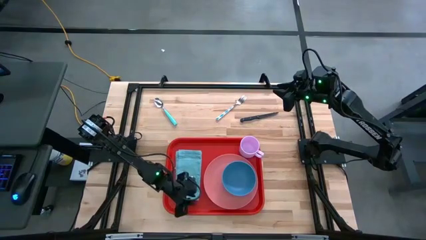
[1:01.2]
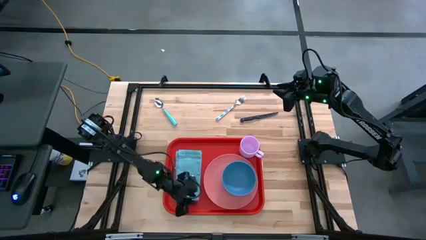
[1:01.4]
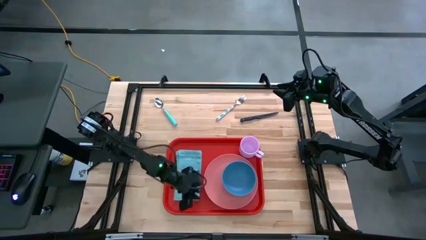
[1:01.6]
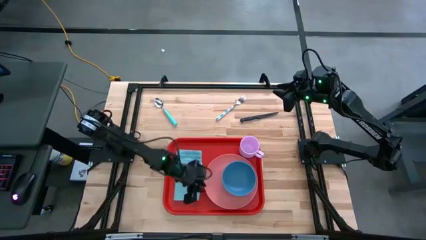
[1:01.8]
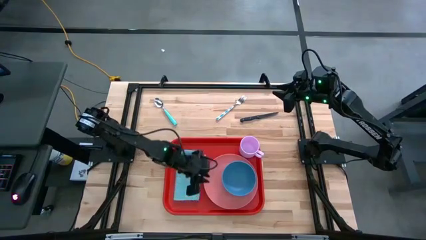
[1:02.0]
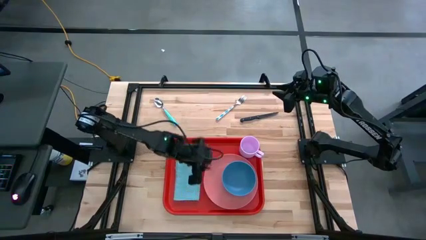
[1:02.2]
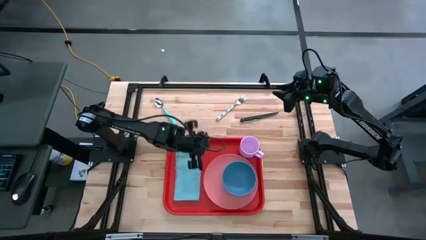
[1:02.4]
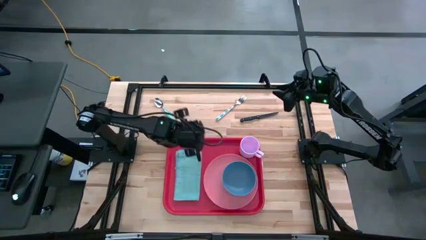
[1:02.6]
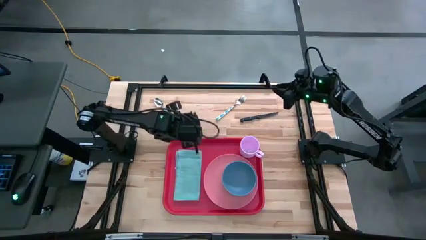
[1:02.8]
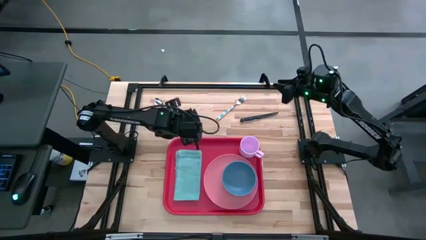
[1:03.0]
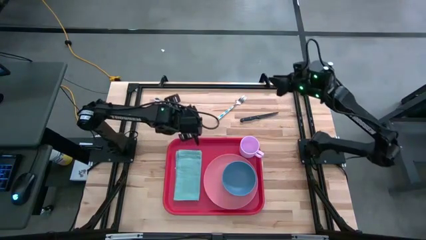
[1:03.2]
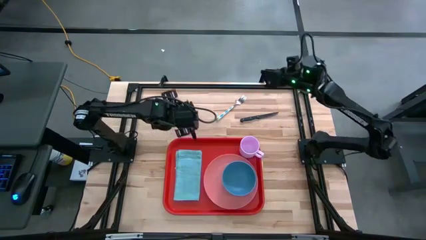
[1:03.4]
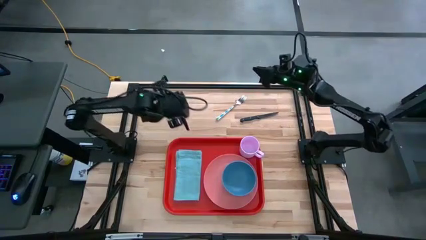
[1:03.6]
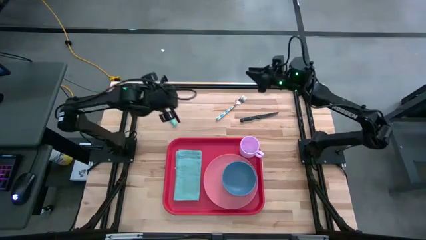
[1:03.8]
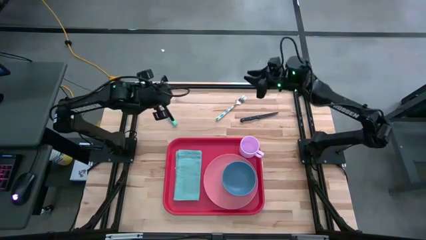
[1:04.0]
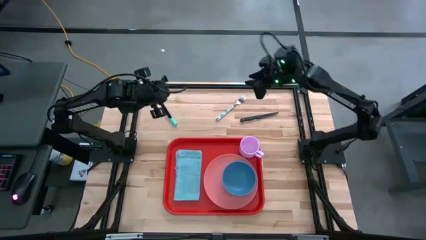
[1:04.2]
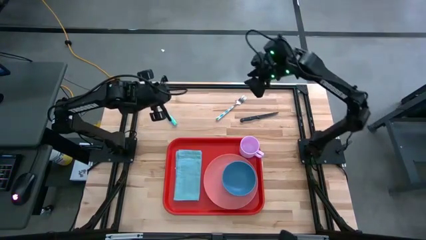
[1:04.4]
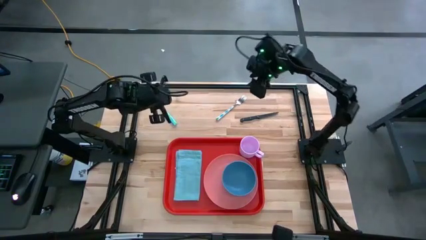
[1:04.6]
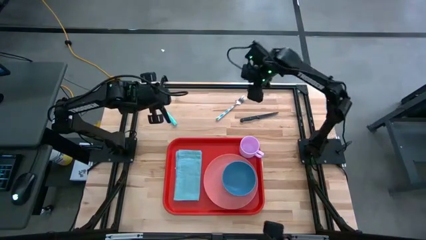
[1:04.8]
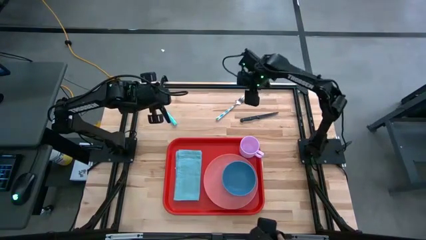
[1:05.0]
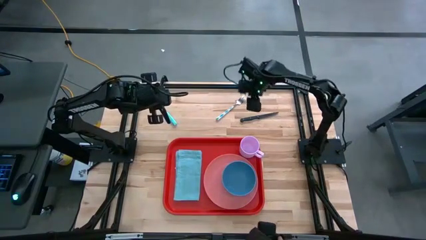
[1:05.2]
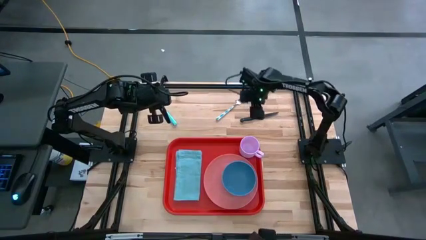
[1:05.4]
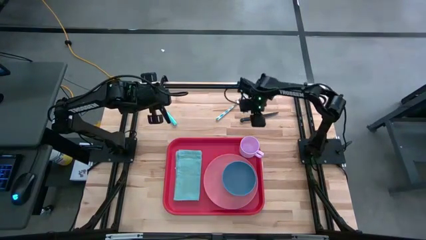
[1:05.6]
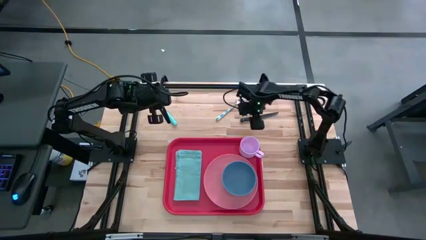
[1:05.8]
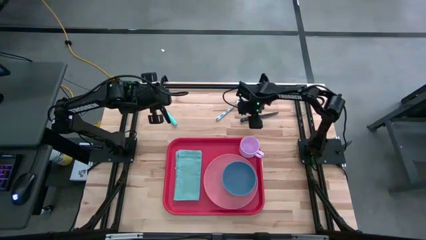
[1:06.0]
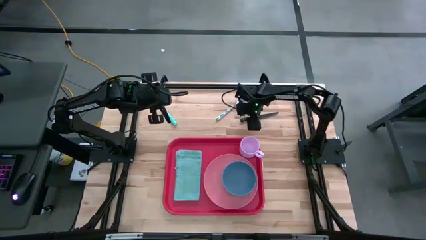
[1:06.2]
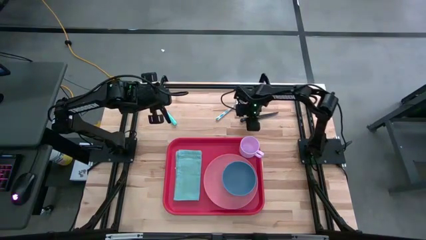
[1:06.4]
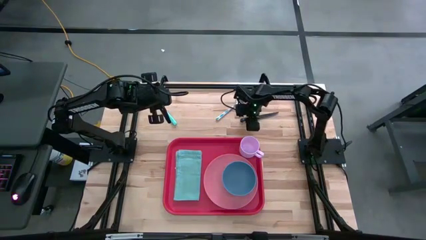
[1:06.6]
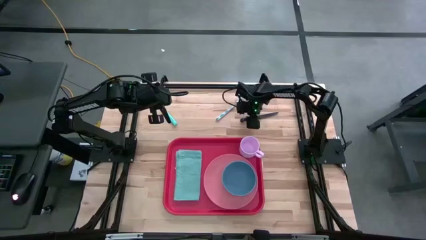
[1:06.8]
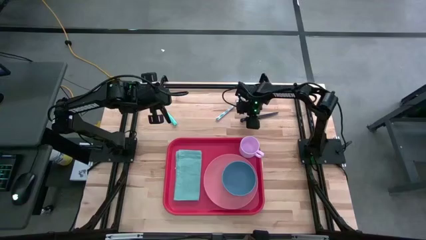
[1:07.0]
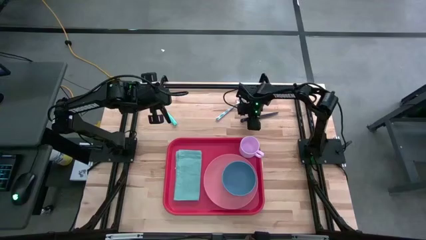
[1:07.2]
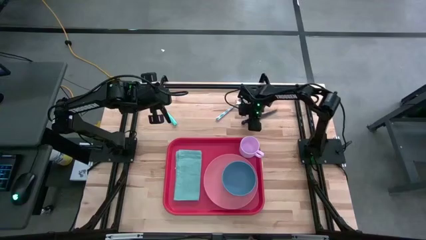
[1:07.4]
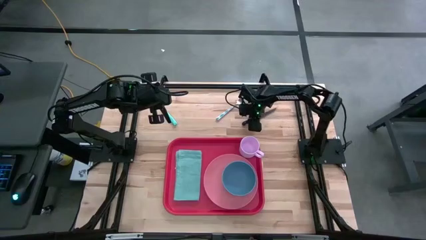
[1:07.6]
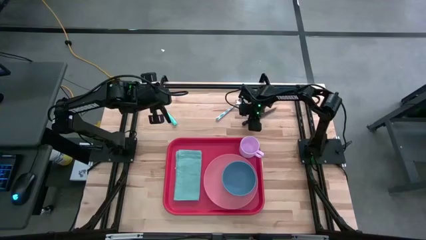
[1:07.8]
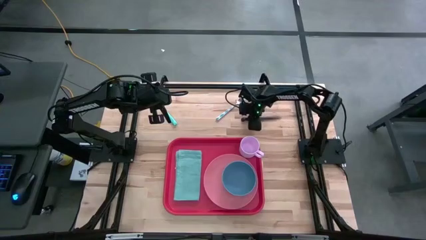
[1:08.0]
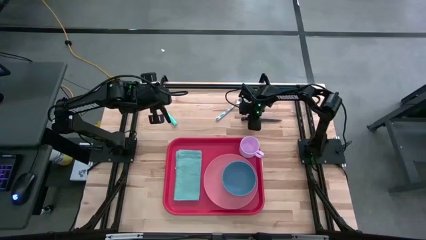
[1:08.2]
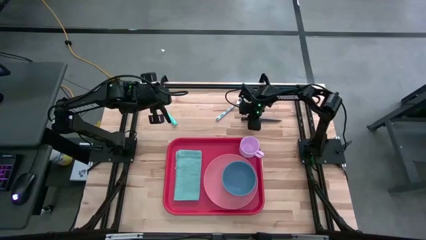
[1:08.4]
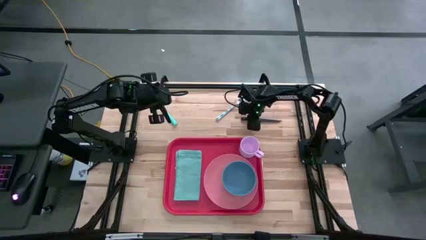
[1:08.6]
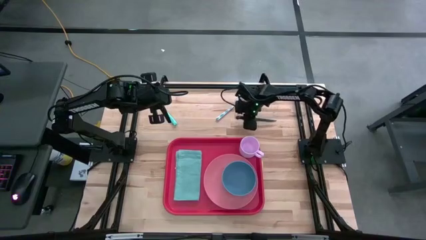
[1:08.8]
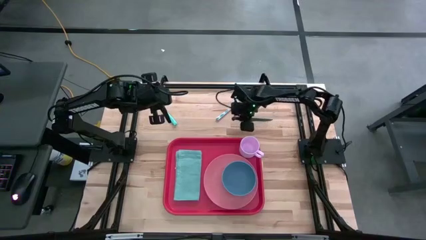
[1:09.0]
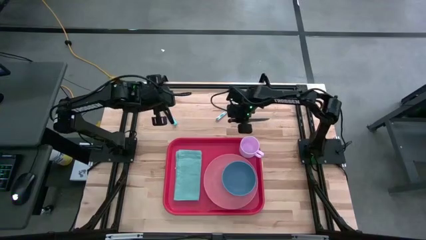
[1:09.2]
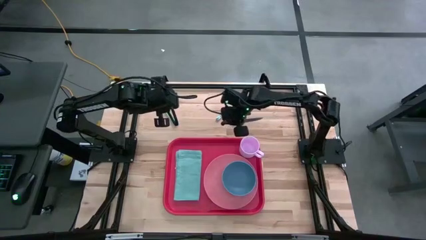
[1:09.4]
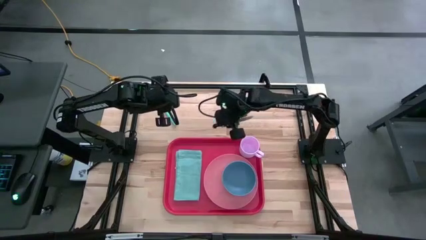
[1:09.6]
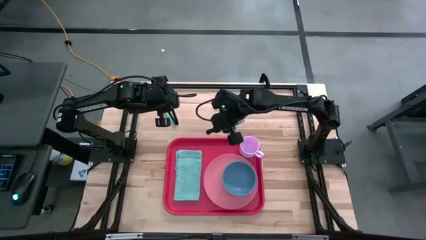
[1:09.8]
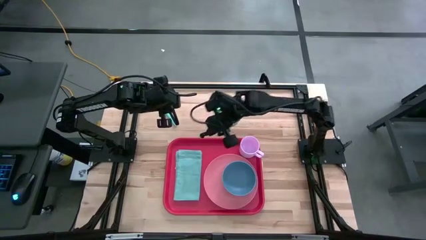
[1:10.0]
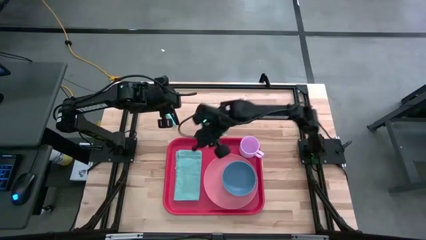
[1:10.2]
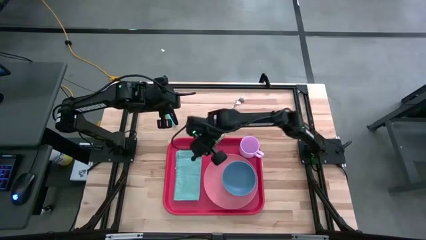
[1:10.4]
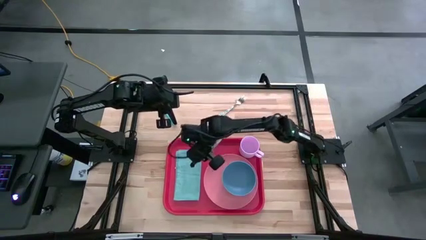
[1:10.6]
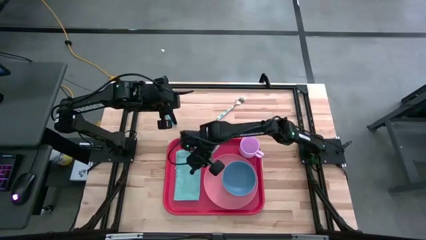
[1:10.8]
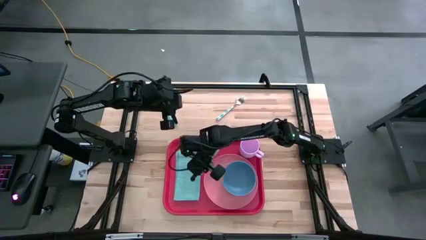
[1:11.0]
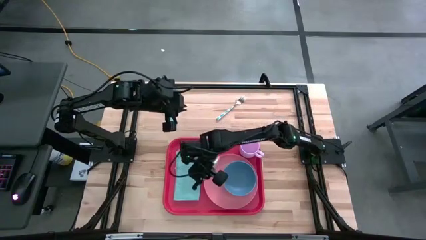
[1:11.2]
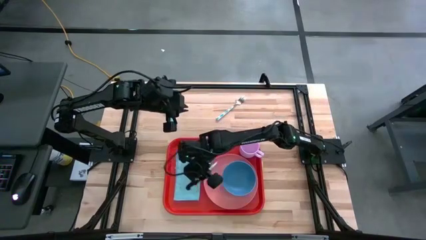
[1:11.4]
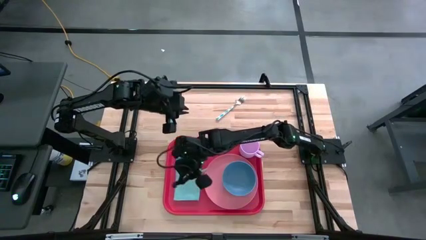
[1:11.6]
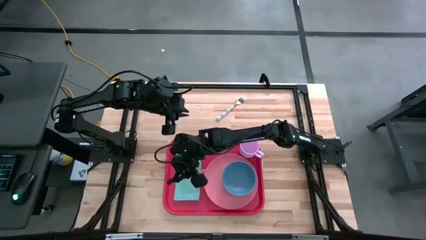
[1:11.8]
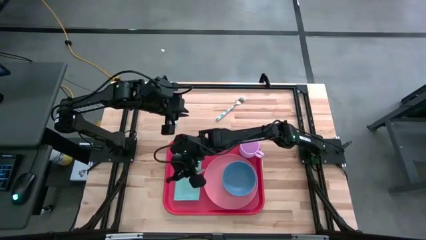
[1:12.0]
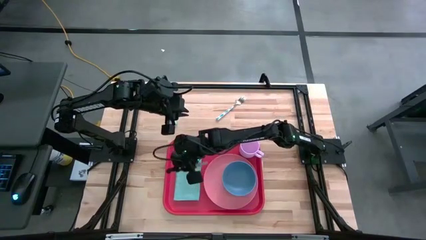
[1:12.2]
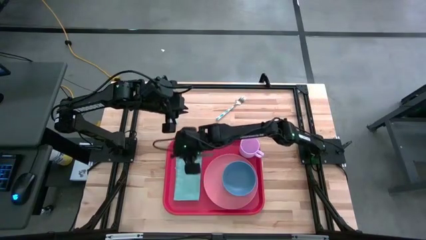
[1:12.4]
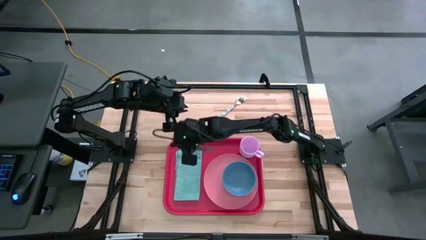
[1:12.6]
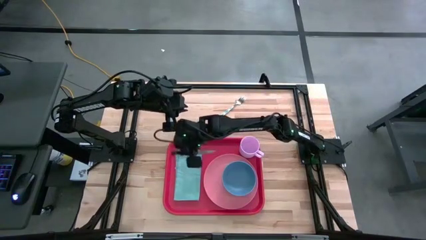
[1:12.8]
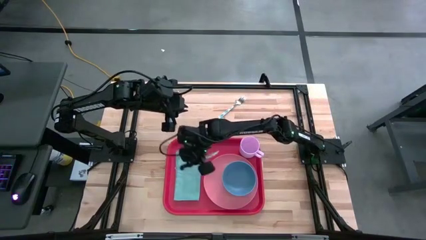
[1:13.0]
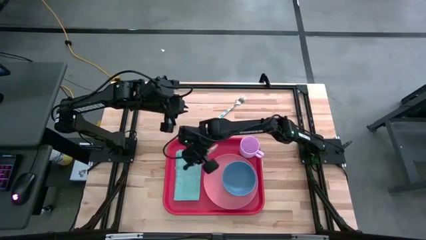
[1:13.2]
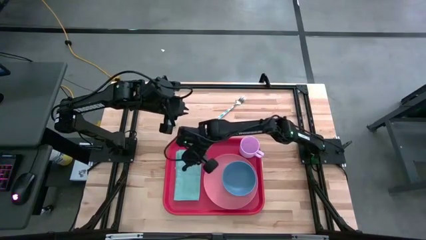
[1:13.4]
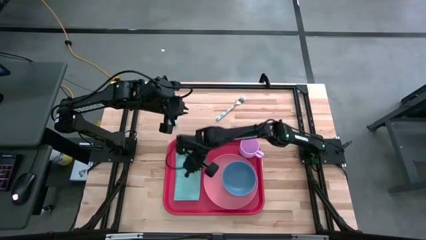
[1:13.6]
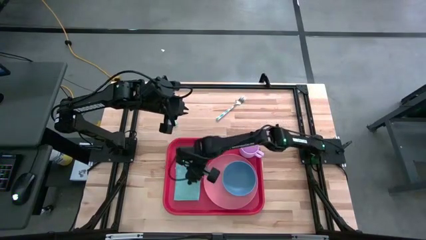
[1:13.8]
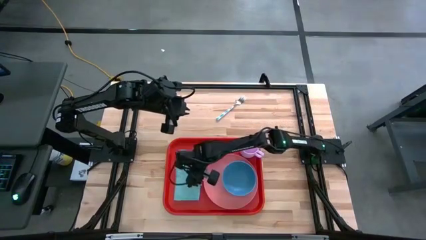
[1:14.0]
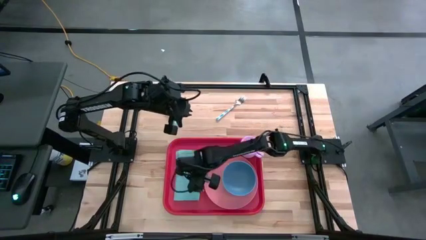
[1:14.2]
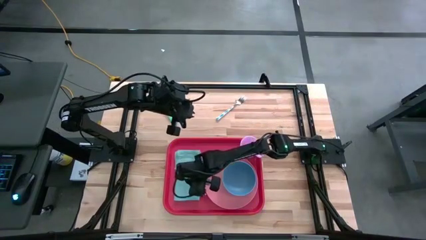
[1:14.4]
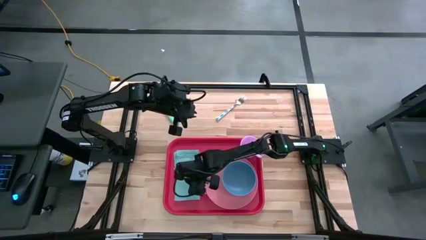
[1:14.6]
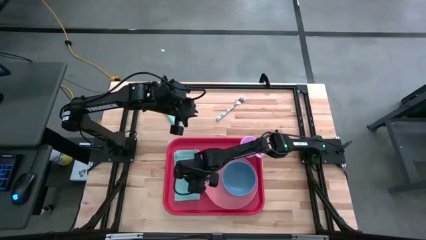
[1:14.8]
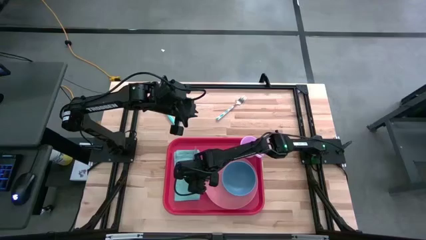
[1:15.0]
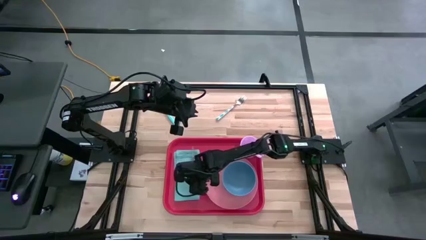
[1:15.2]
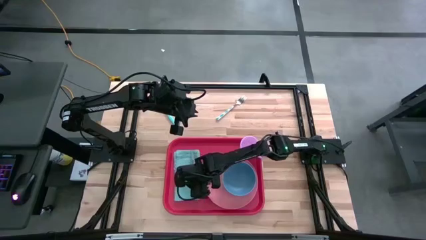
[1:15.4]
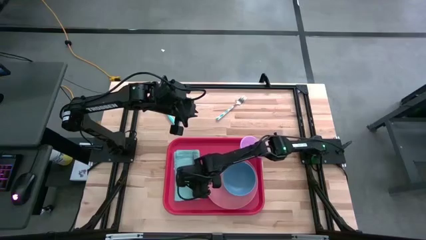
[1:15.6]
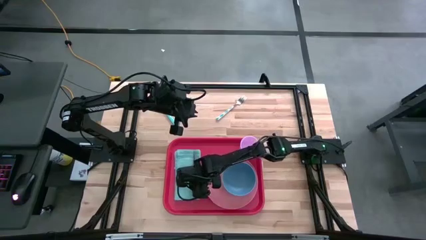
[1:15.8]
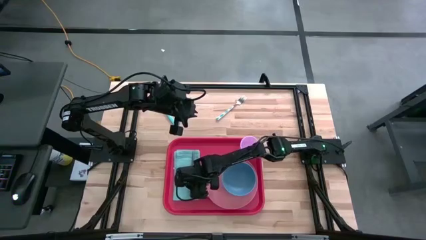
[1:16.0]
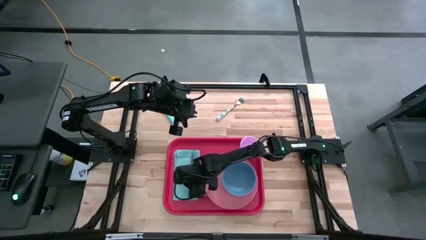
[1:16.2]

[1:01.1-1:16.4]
Task: Set up tray
Put the black knife on the blue napkin
